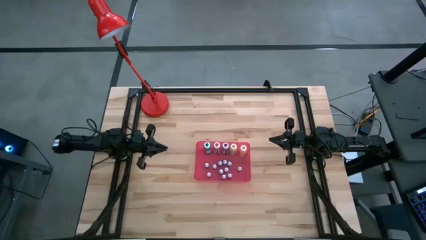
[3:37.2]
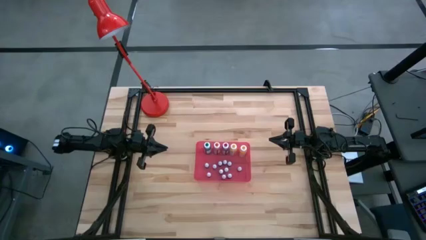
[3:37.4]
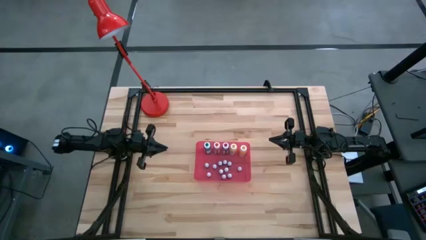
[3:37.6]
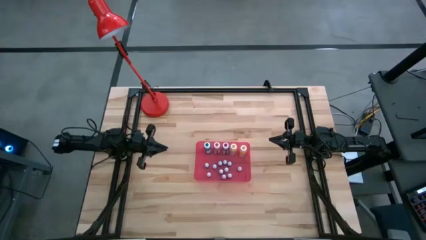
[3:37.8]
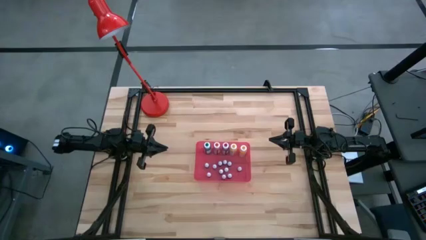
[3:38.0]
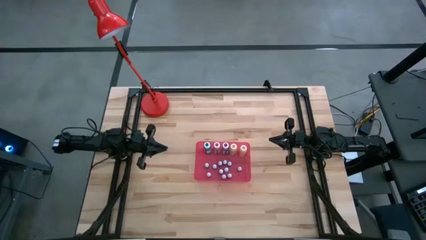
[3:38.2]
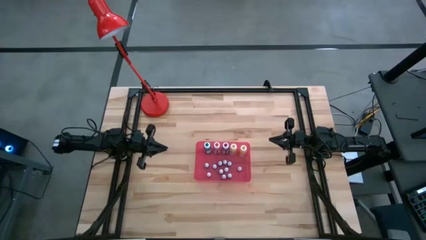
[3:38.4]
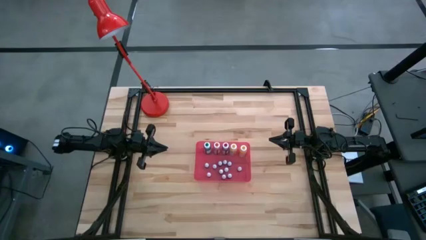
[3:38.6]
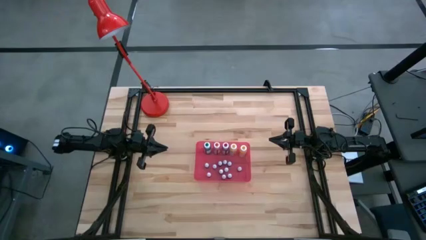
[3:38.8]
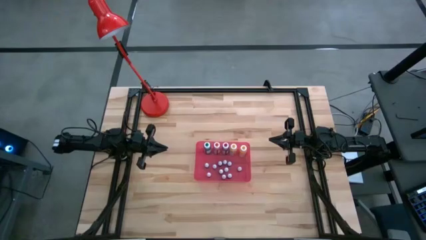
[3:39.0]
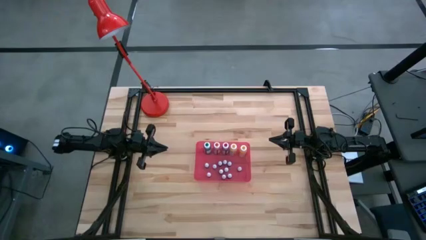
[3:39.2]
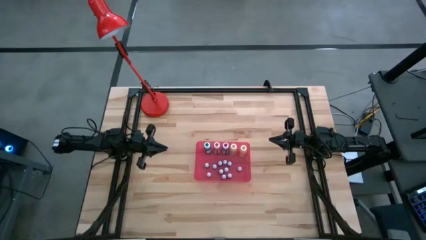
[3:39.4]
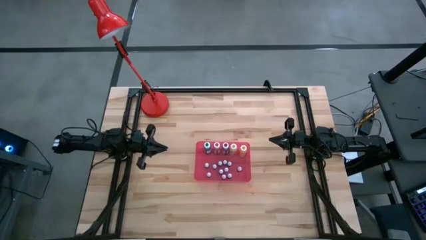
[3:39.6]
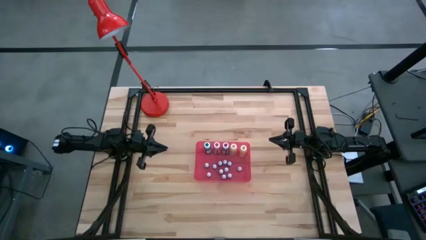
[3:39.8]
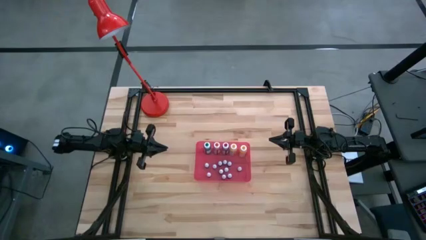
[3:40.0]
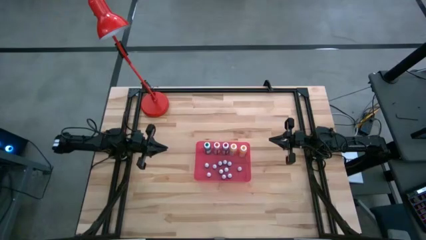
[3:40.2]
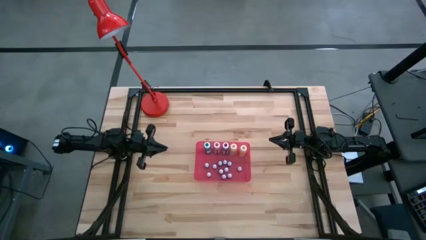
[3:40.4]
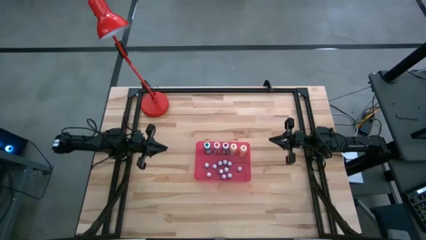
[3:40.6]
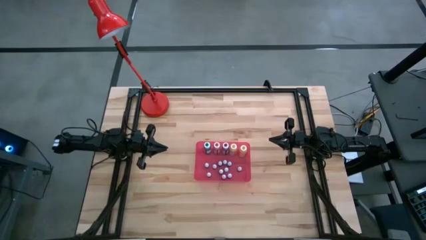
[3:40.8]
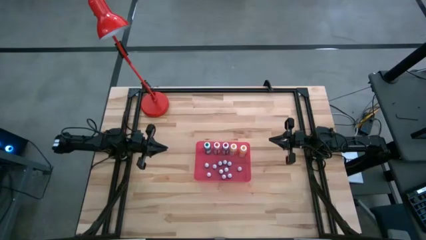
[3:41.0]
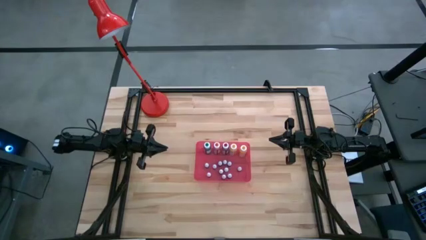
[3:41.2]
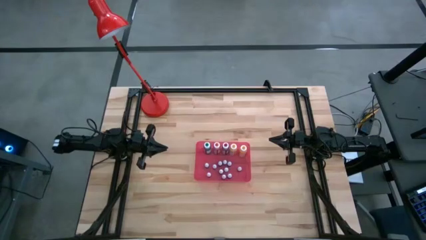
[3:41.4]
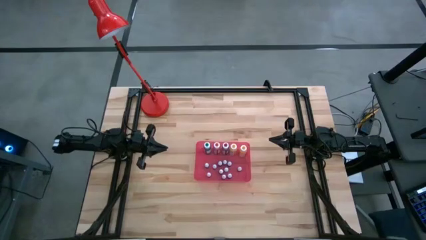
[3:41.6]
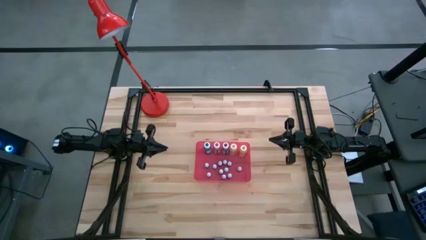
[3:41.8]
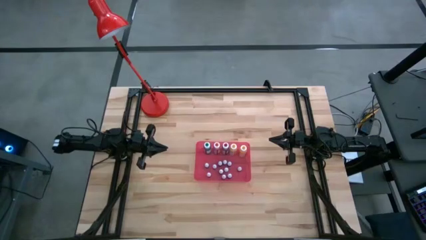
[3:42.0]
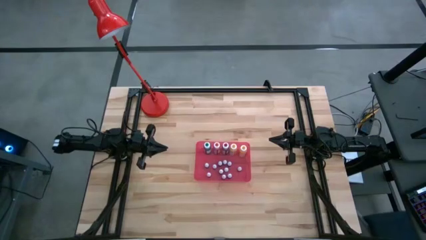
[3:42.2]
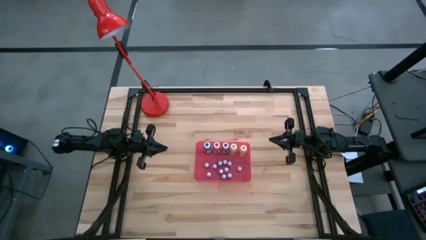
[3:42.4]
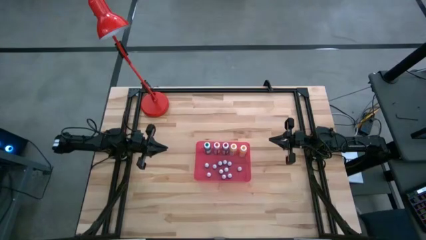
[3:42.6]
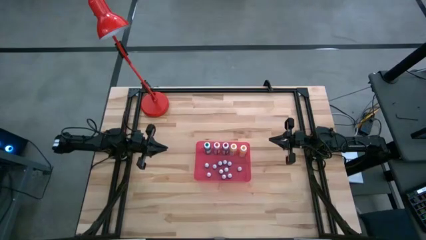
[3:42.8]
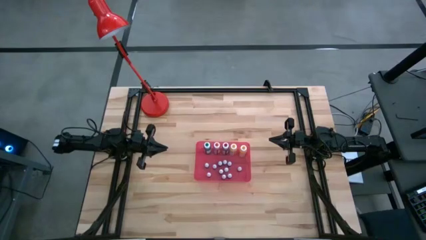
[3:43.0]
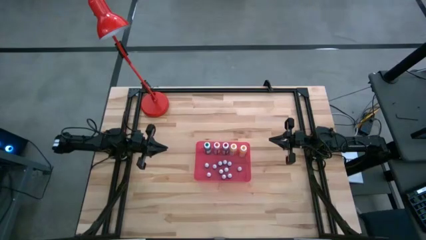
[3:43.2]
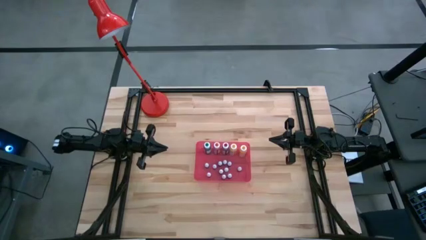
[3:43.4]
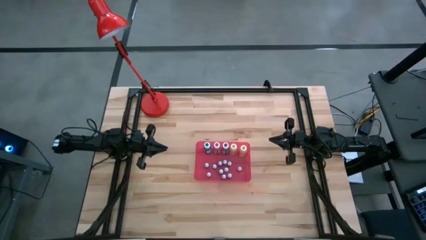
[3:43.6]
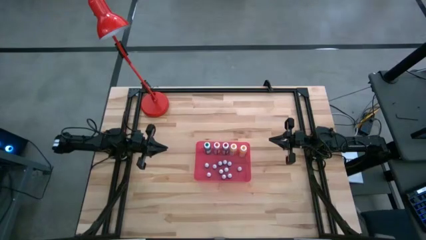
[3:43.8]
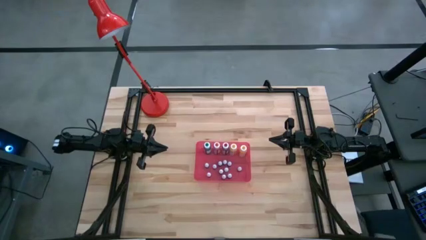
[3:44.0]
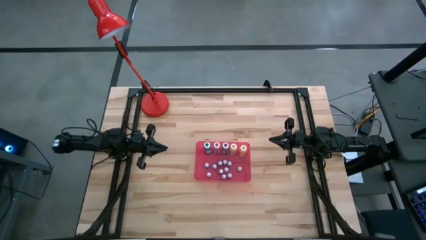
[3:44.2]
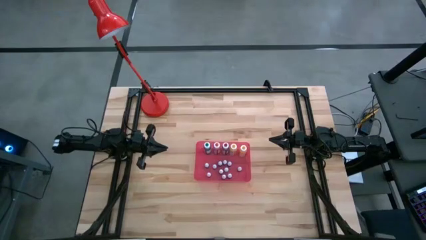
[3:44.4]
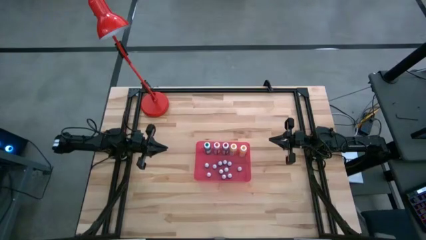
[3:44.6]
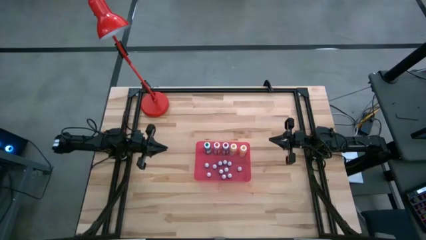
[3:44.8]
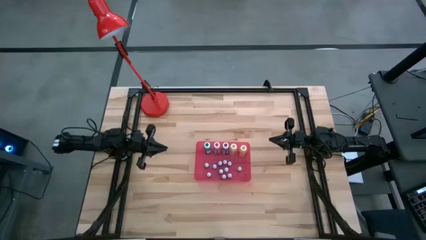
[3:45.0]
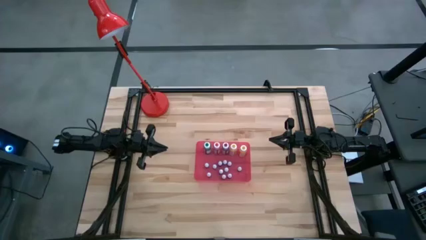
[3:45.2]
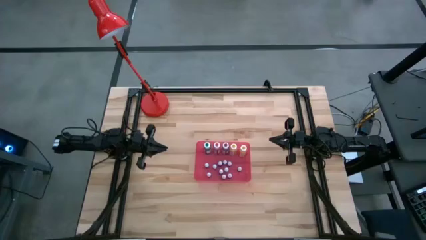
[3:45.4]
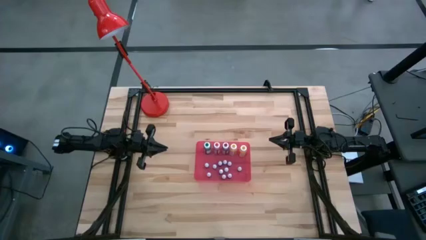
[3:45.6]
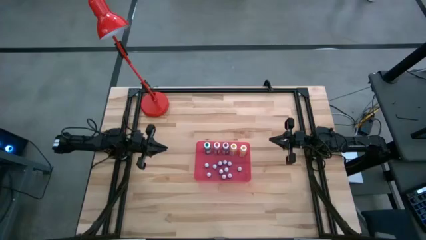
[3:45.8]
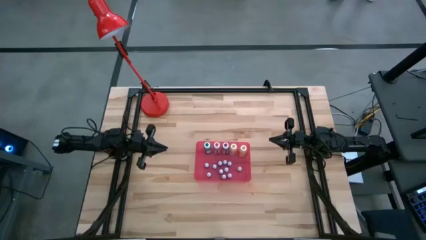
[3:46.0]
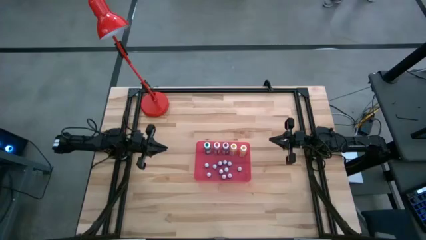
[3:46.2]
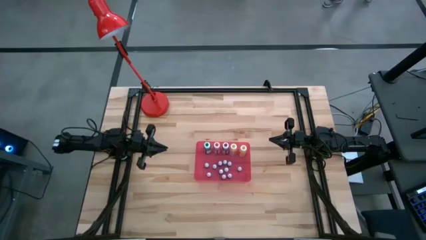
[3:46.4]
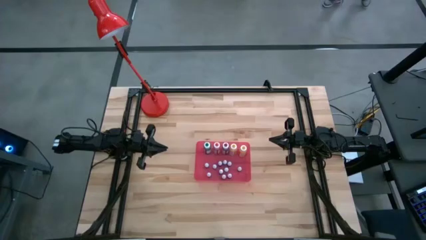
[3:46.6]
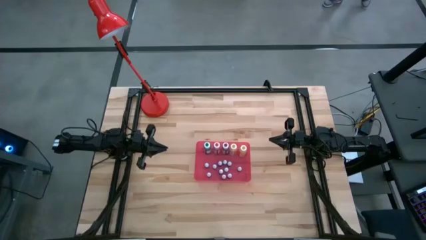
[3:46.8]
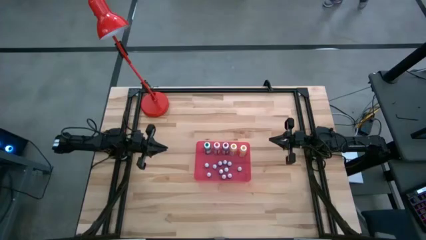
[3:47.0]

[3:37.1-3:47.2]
Task: Pick & Place food coloring
Return to Home Position

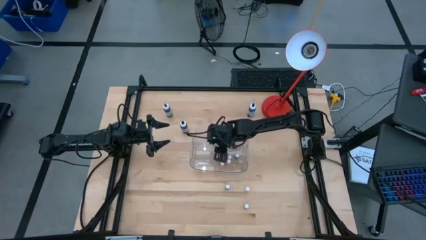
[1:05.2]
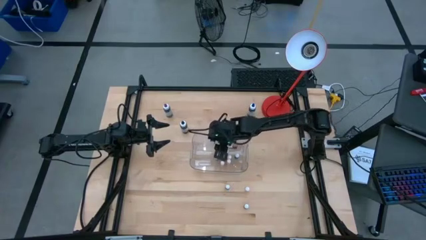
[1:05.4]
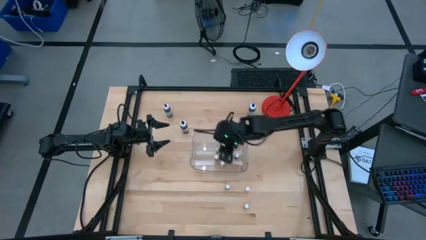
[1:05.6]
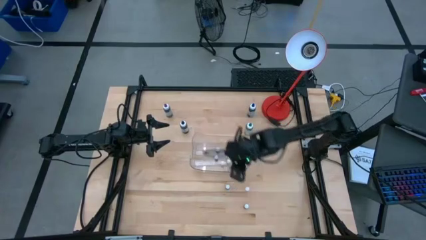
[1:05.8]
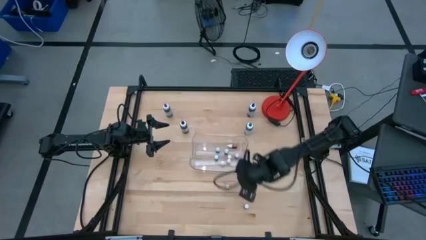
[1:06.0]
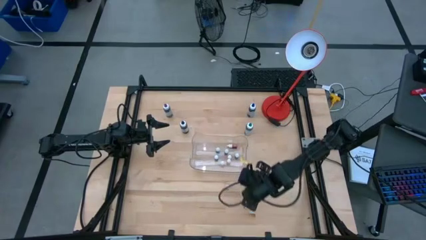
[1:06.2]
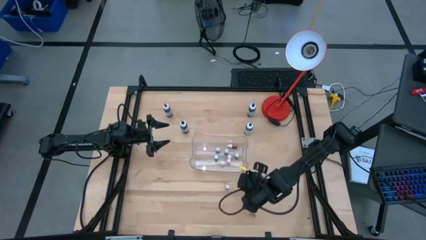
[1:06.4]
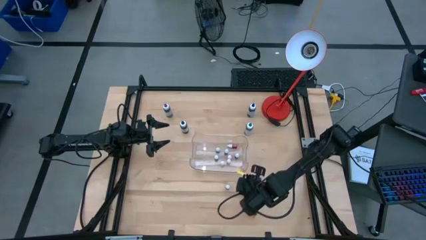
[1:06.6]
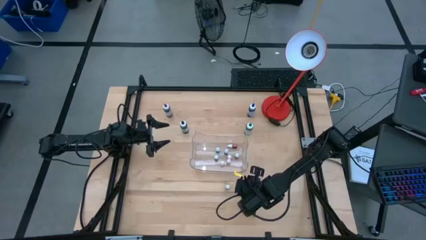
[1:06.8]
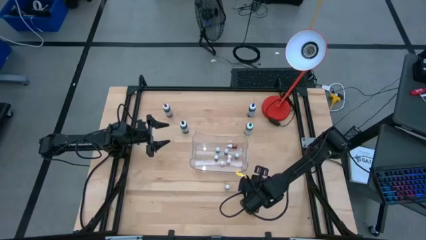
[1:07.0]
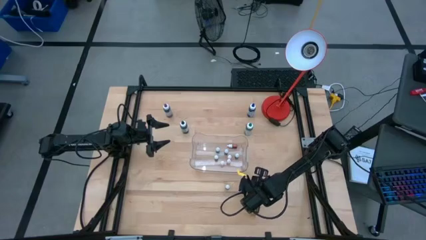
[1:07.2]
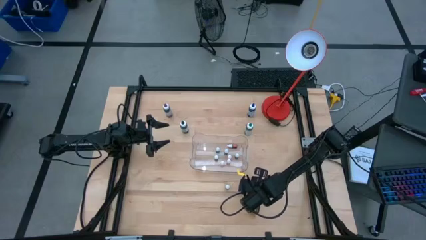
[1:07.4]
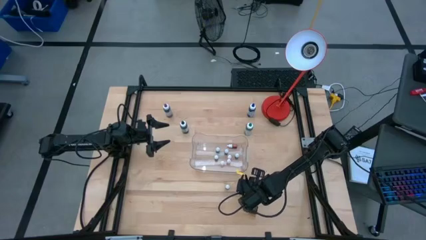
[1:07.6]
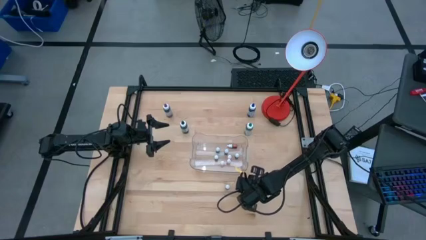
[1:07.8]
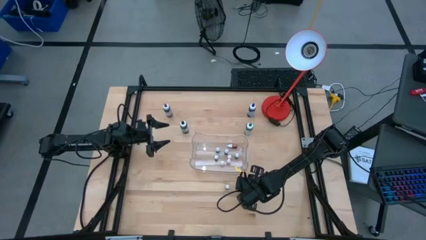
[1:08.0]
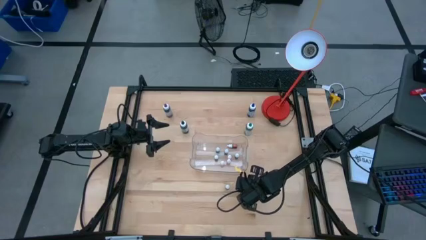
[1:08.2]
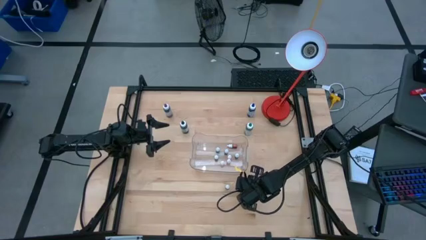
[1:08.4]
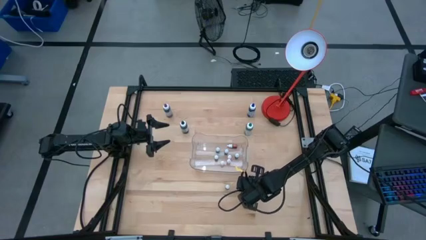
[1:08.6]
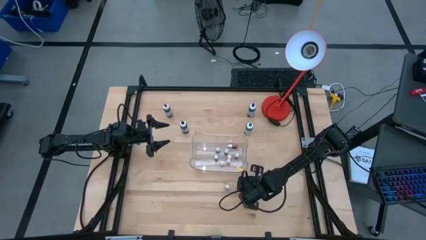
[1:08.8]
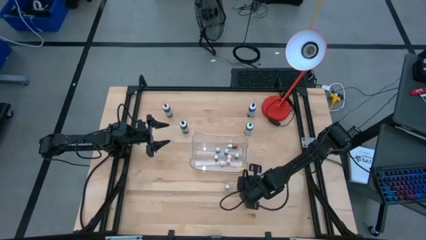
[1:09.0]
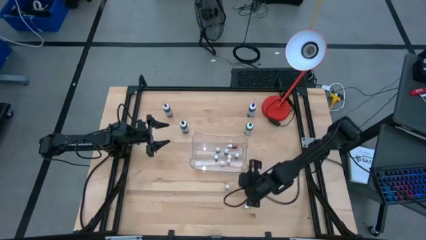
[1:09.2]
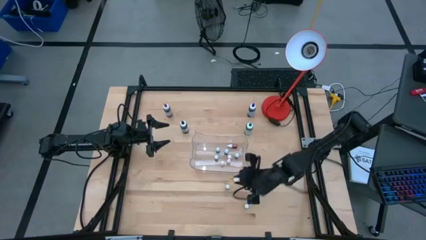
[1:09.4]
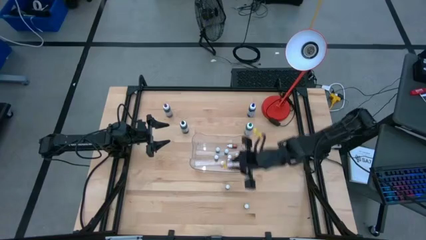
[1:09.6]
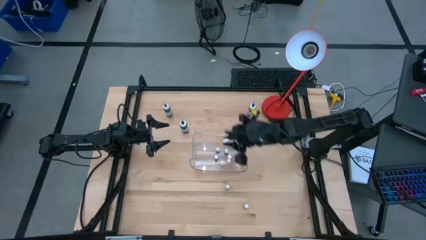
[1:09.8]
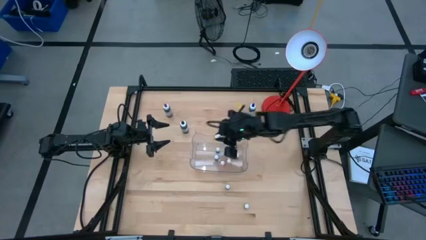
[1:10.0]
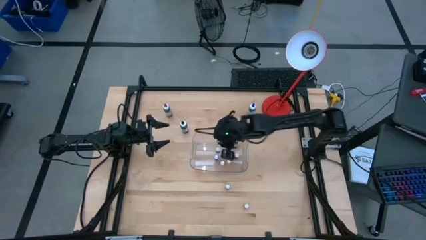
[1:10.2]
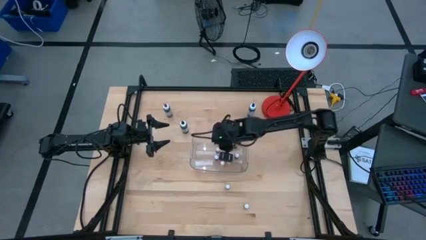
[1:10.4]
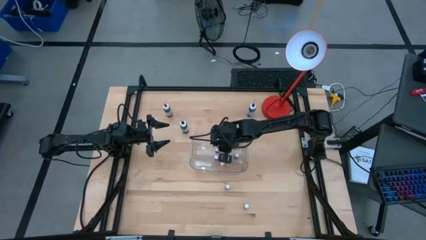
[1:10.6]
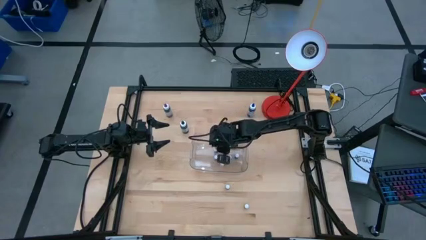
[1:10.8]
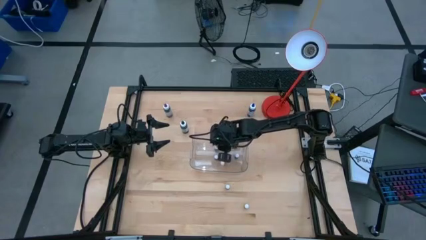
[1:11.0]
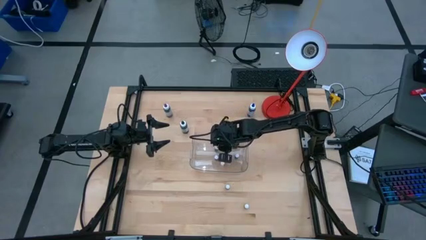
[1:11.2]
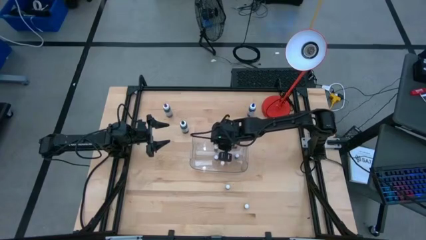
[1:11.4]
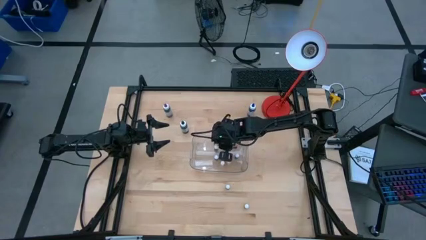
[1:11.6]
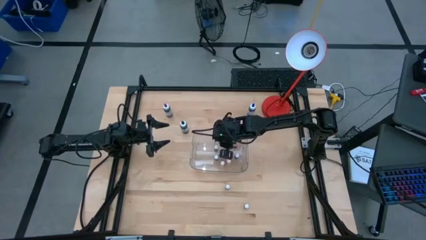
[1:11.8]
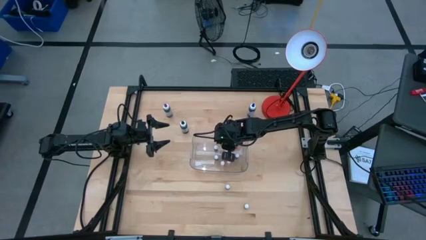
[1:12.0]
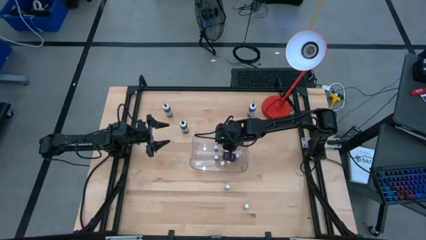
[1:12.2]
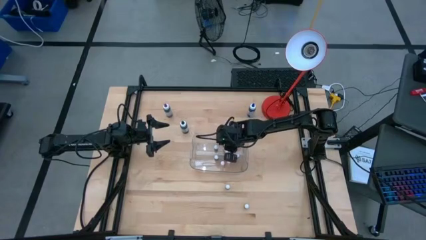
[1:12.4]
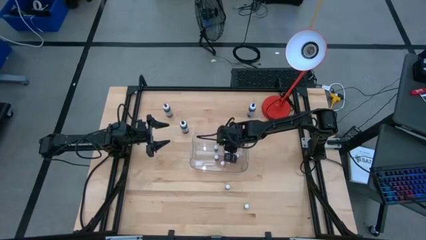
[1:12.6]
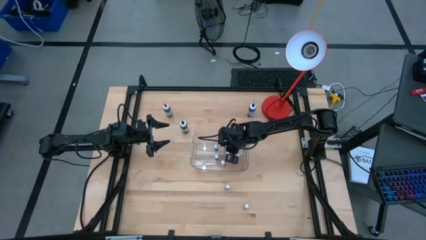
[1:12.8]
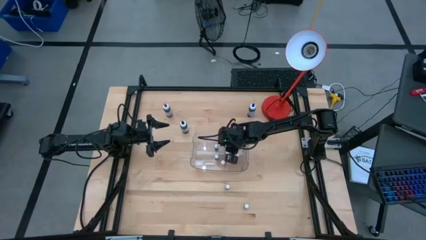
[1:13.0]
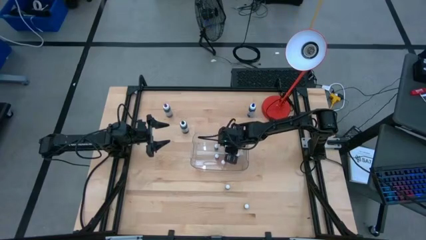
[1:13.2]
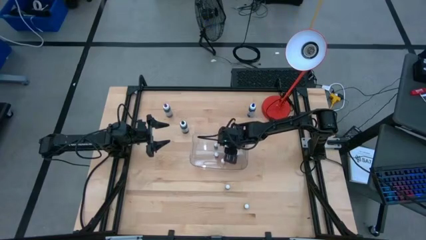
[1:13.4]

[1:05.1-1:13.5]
Task: Pick & Place food coloring
Put the orange food coloring bottle into the transparent bin
